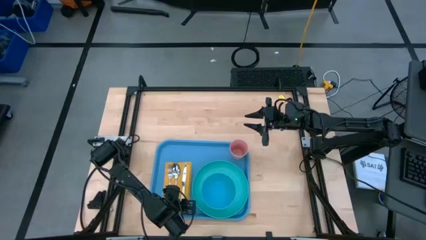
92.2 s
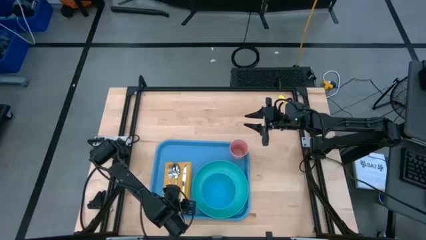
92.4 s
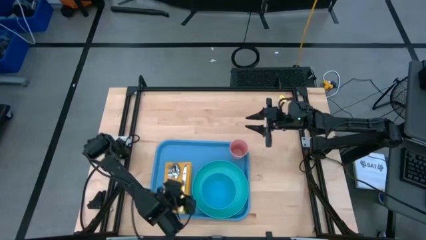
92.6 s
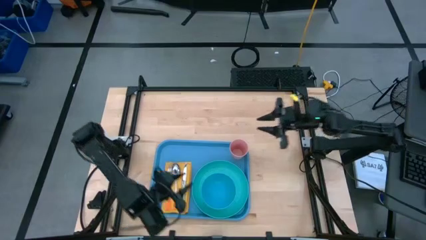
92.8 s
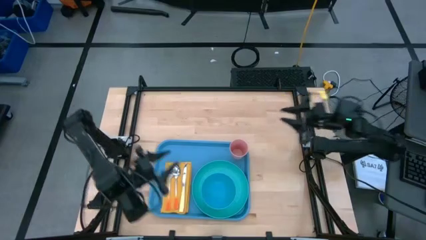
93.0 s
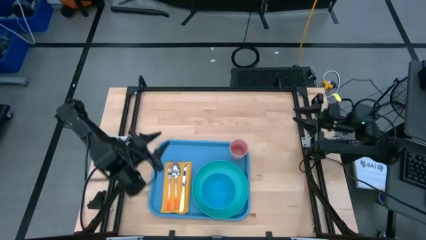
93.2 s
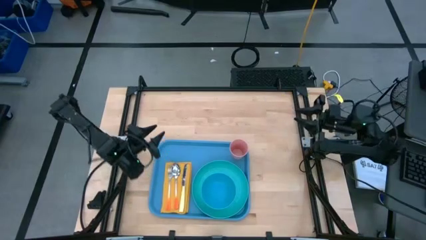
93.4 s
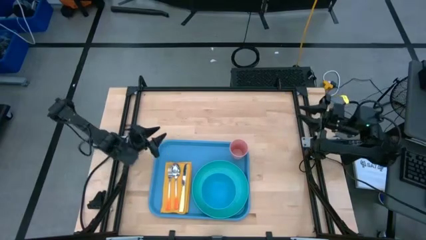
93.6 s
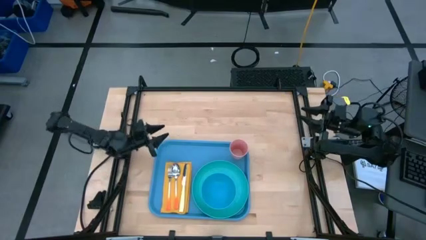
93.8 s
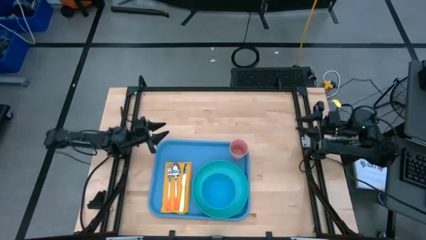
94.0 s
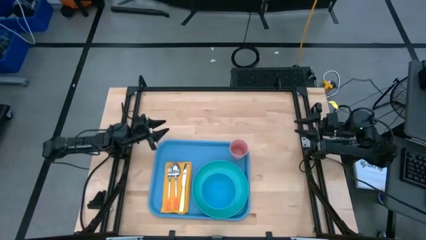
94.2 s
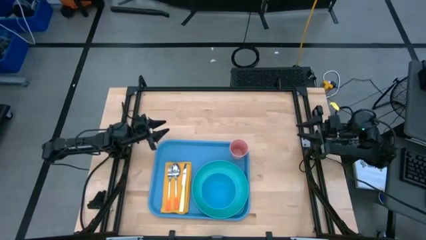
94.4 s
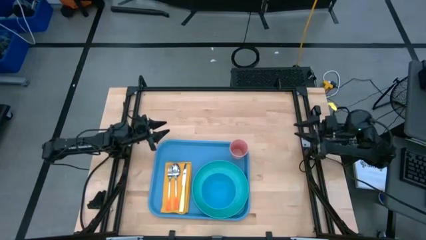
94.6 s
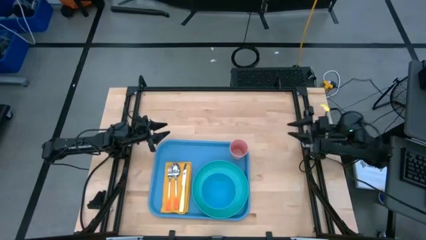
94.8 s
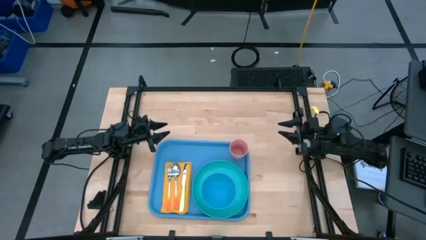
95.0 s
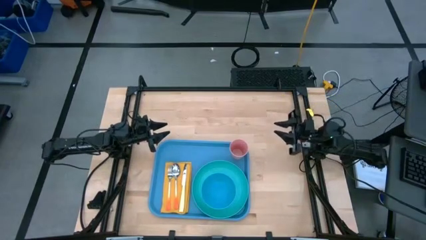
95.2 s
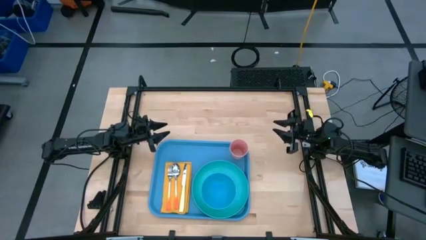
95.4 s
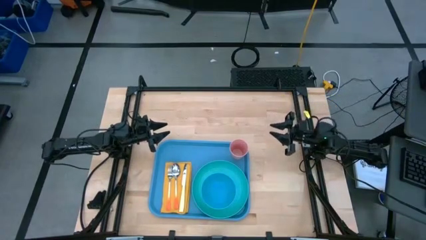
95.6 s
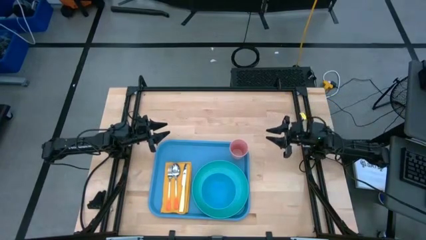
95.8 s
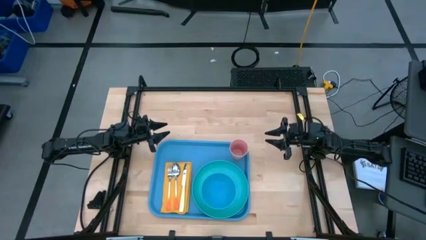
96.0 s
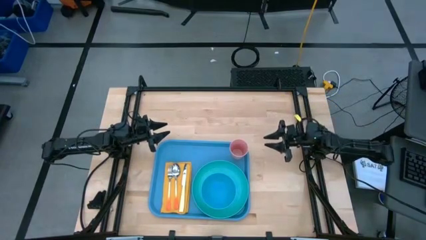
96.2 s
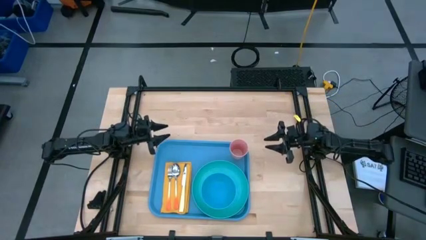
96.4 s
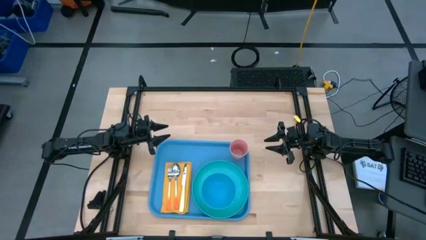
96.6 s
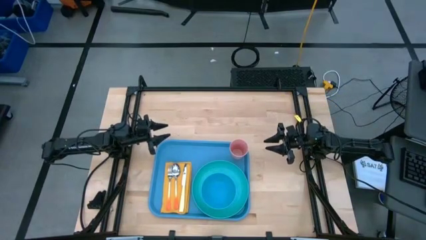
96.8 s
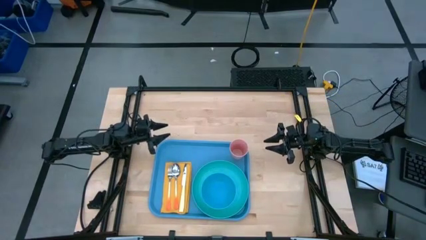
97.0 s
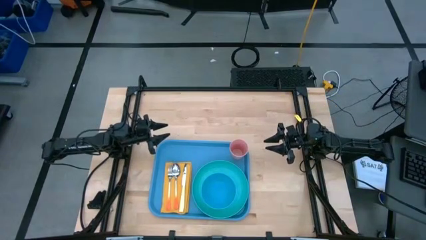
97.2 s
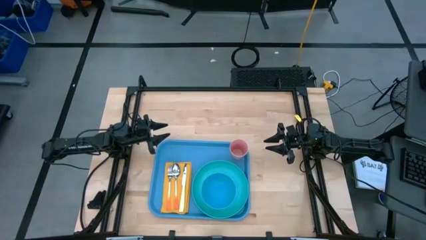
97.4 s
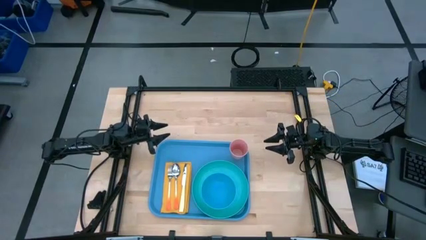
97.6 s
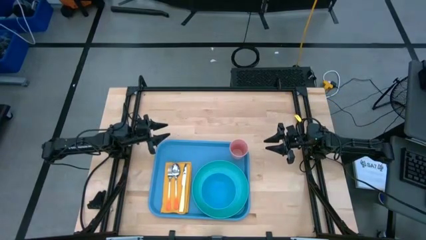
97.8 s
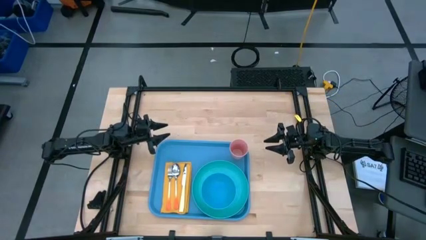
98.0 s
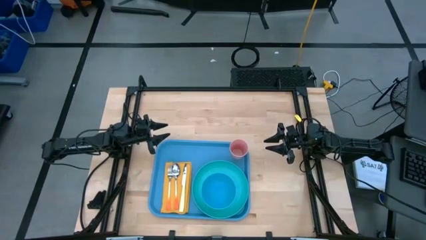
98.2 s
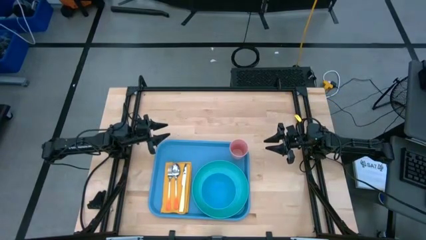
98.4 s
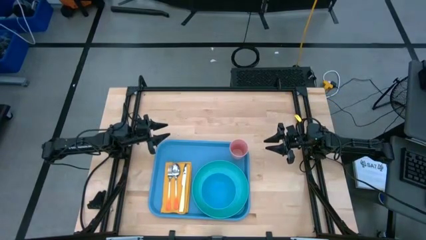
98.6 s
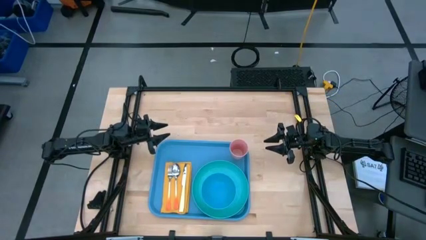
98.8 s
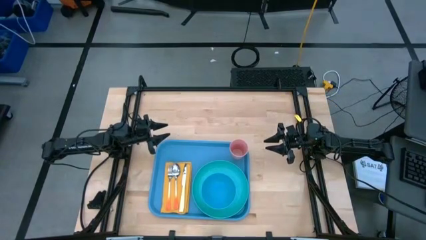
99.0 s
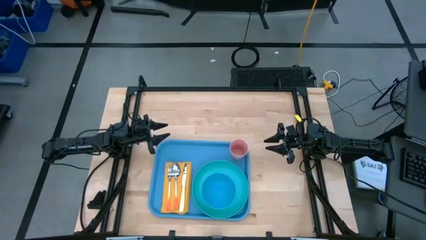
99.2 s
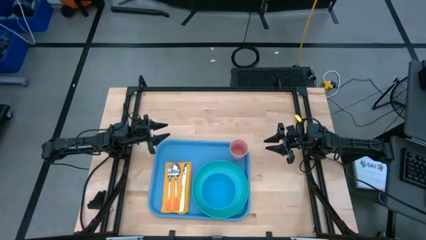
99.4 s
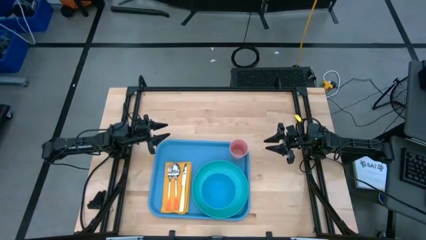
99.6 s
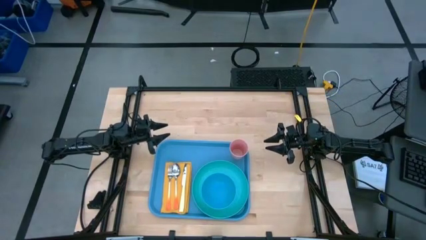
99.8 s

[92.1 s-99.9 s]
Task: Set up tray
Return to Home Position

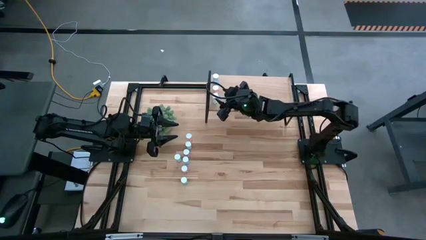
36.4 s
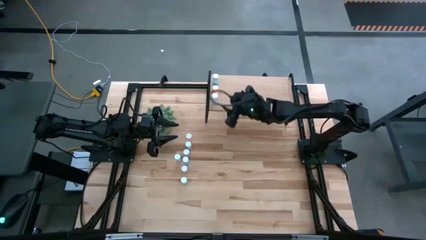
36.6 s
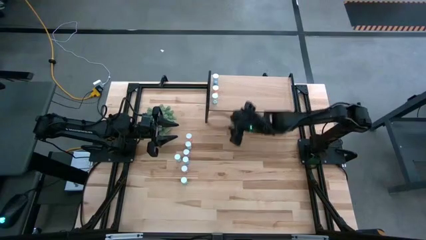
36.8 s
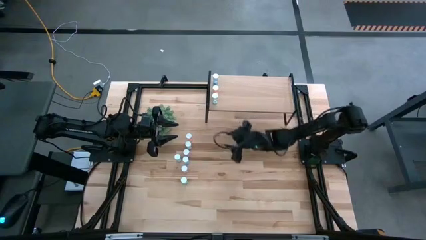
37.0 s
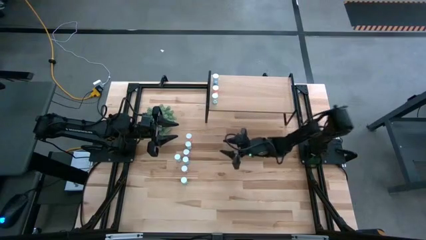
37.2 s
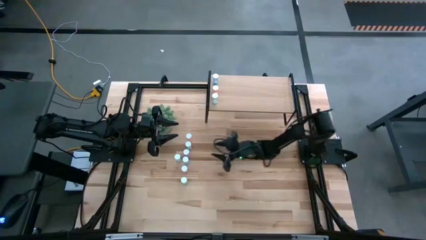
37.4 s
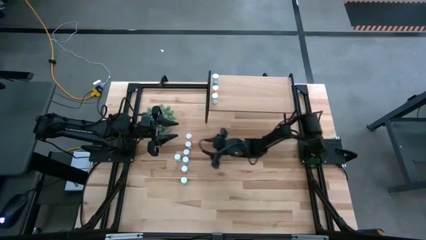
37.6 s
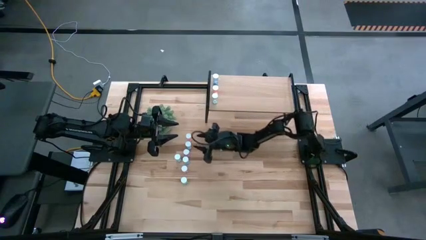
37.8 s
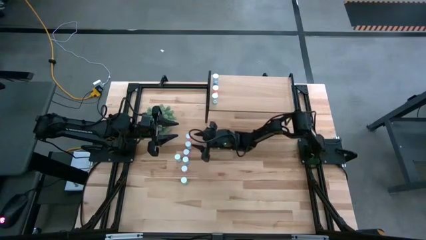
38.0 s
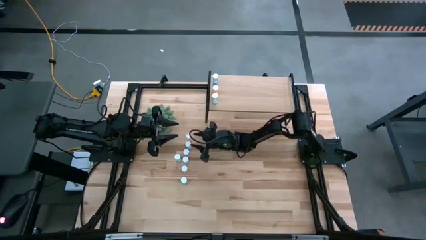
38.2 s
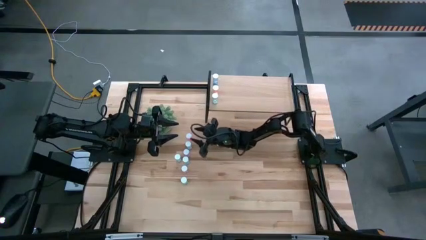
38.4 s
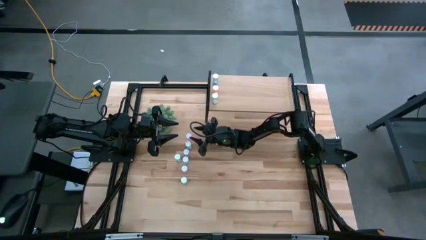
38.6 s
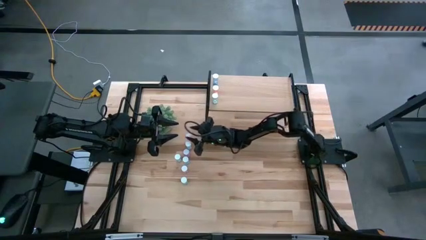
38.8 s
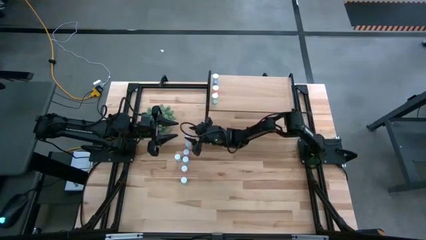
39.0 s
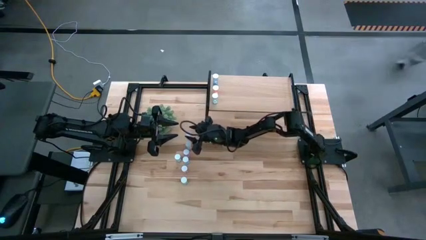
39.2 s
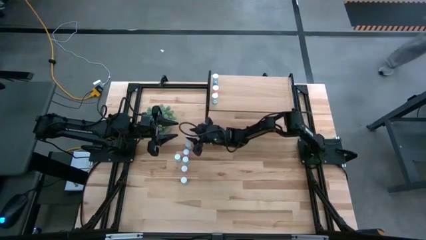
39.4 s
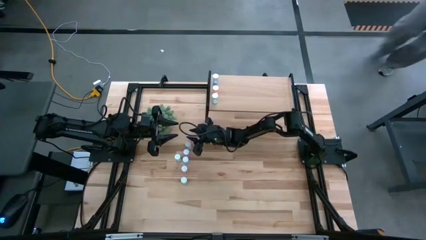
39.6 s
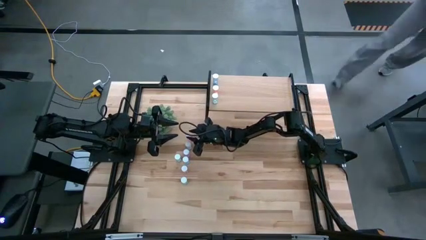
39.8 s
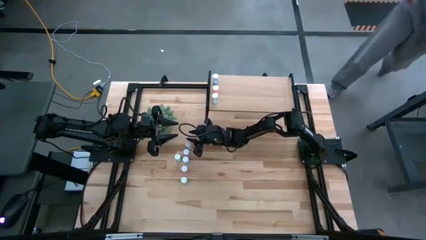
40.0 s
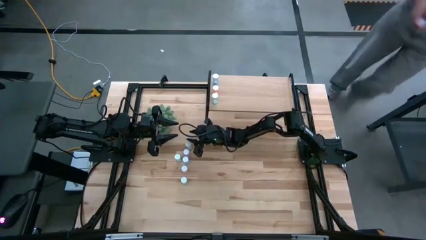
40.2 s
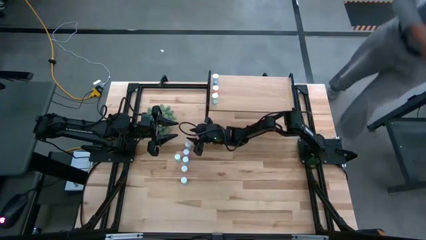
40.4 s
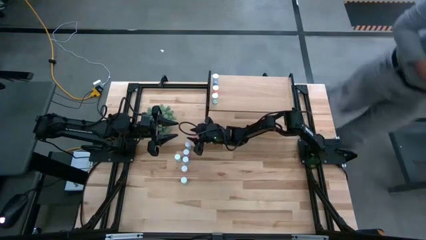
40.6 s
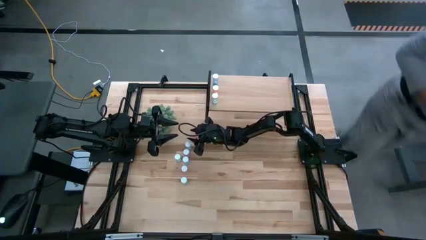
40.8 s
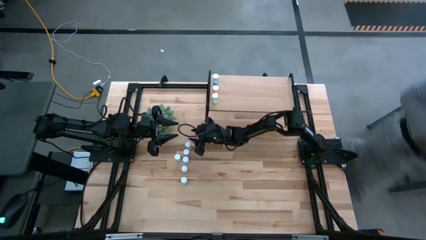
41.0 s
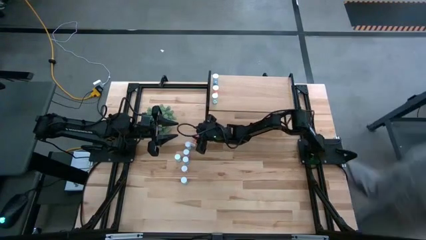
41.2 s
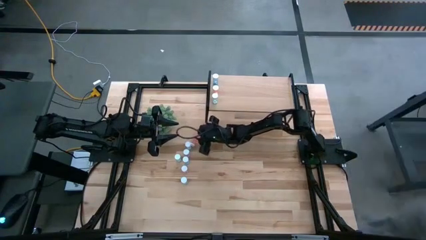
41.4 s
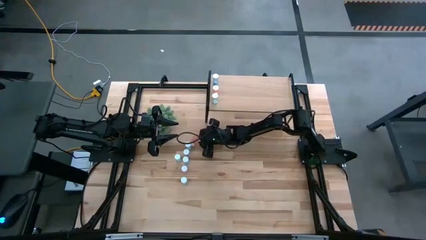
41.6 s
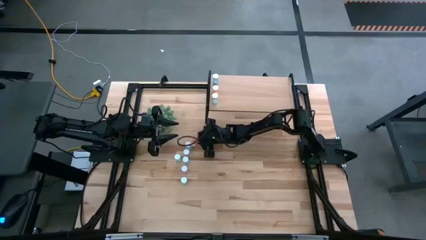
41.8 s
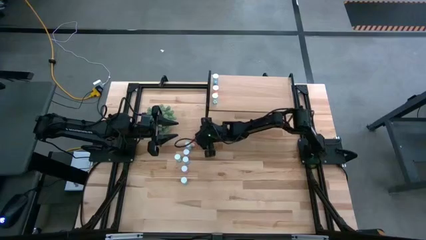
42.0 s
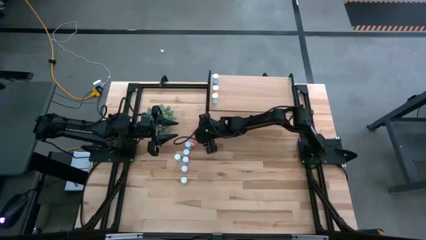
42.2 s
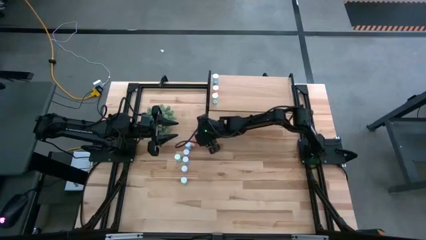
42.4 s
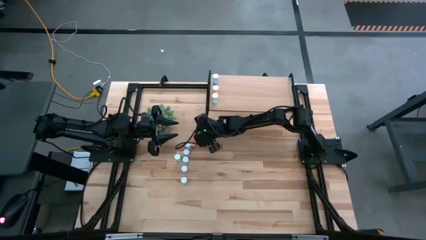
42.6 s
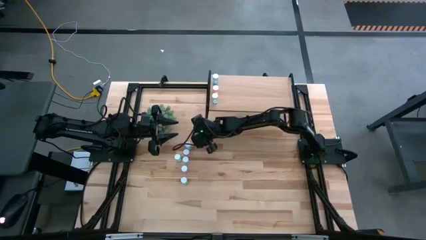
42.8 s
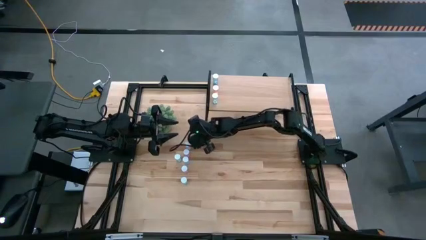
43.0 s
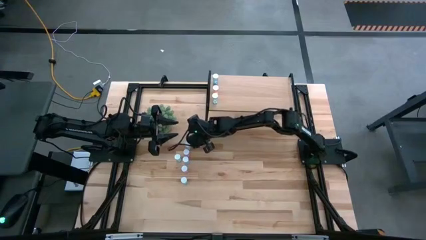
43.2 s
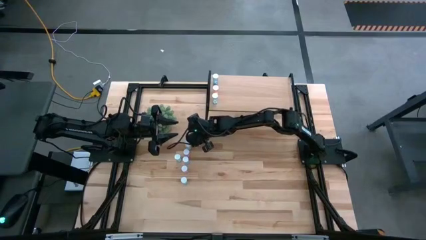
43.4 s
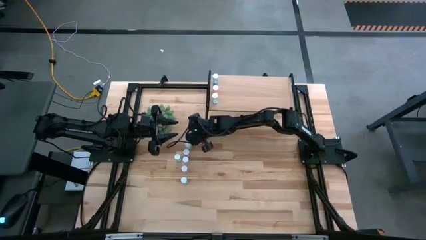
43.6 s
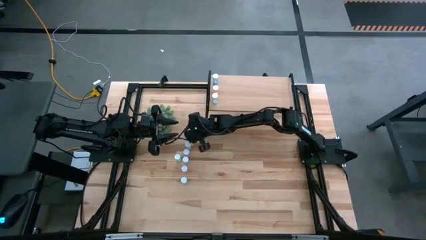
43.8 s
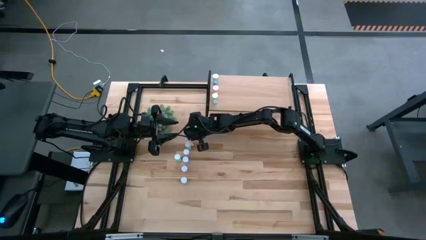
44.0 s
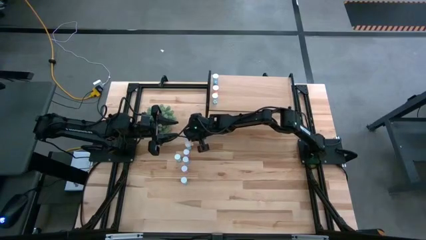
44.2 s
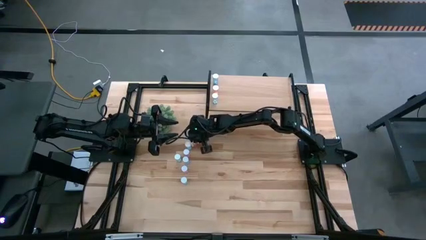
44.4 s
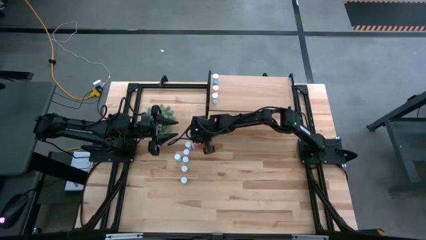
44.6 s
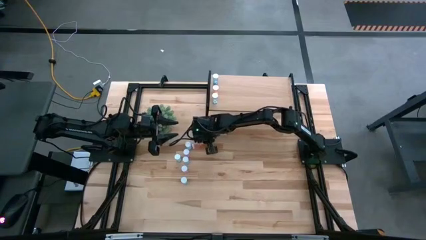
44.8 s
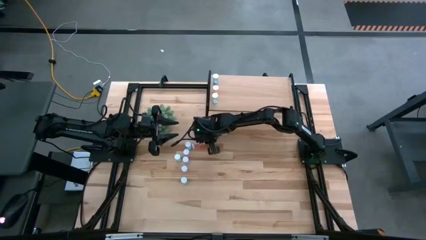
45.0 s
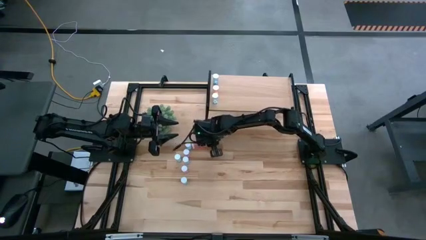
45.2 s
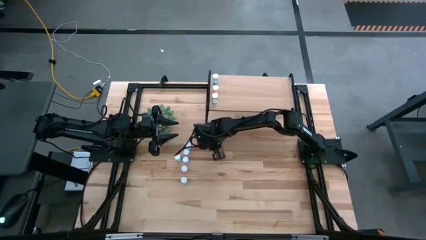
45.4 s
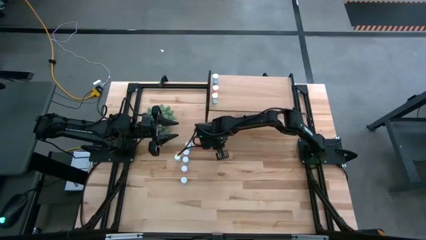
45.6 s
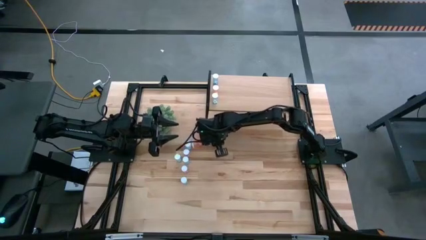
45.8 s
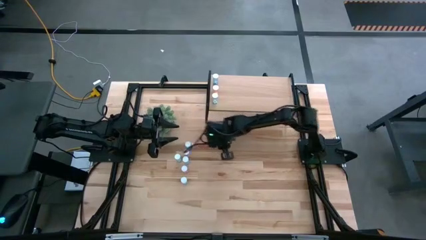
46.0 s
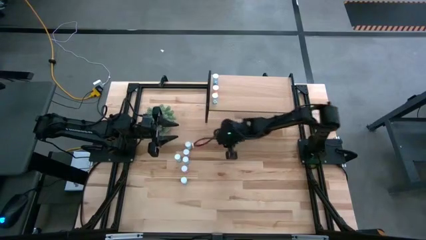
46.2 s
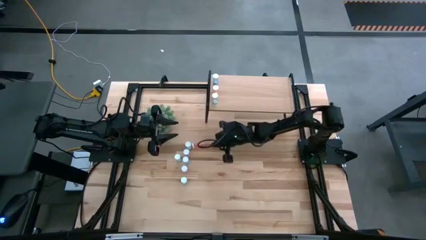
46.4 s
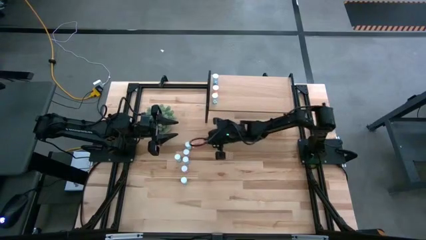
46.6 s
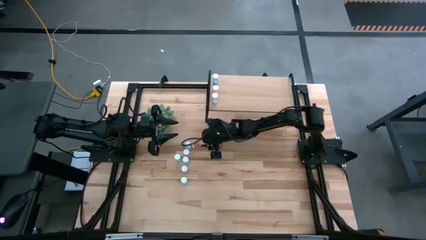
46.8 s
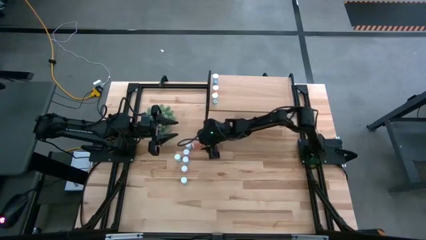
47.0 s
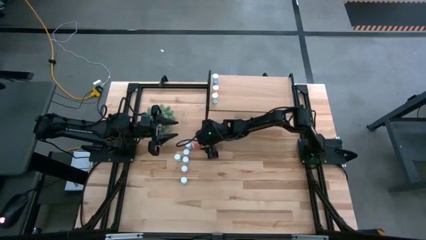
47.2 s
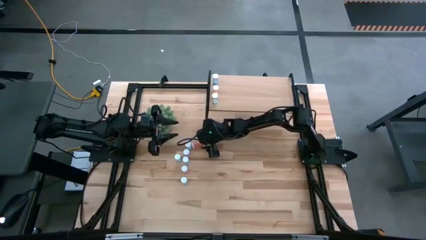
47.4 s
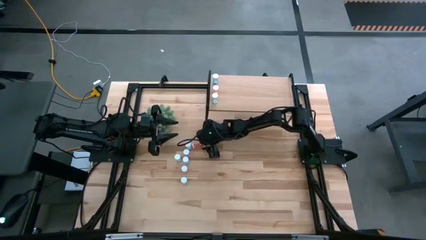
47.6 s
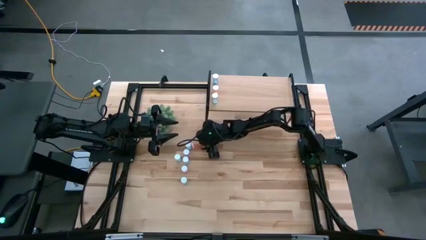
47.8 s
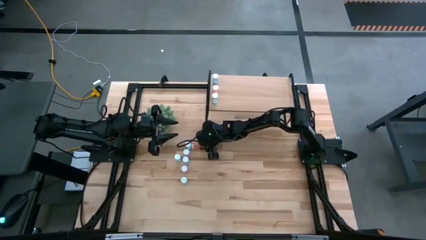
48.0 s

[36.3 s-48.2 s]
Task: Pick and place medicine bottles onto shelf by color
Put the transparent orange medicine bottle on the shelf
